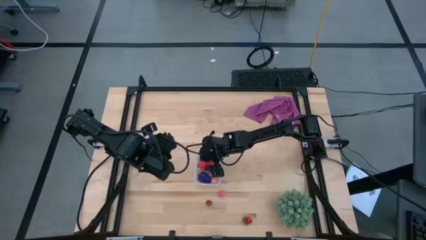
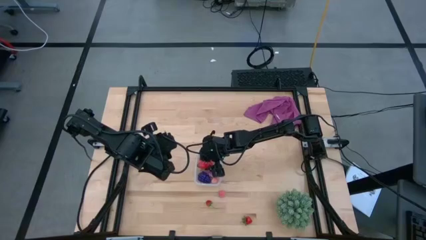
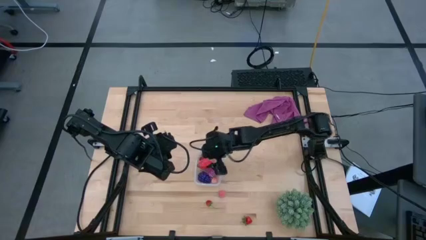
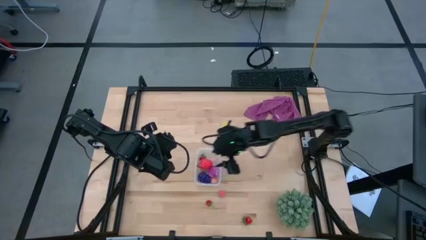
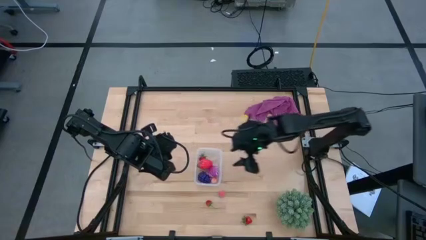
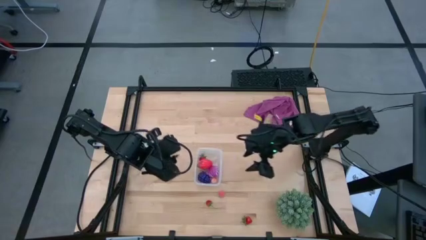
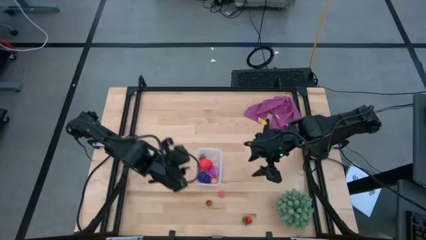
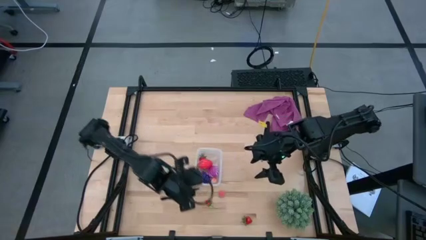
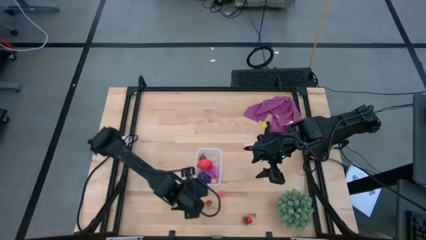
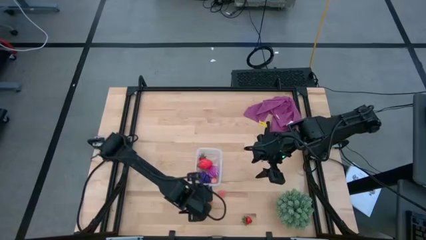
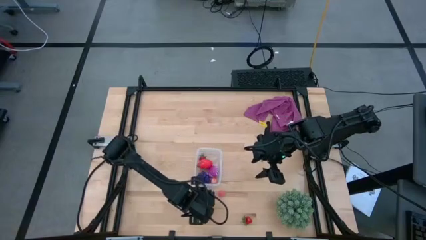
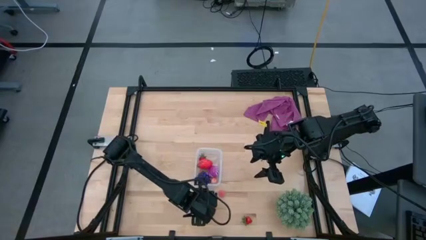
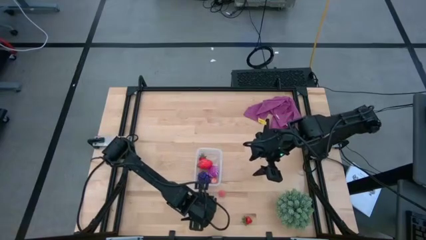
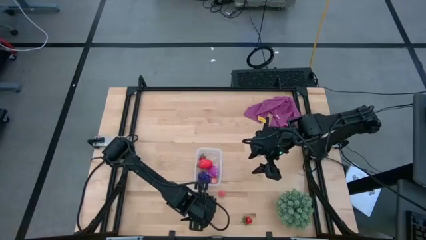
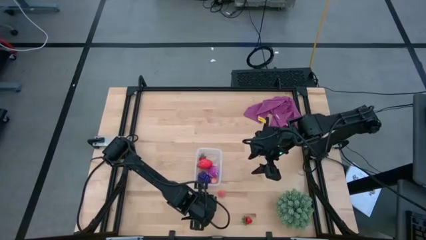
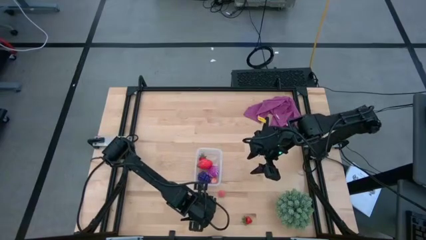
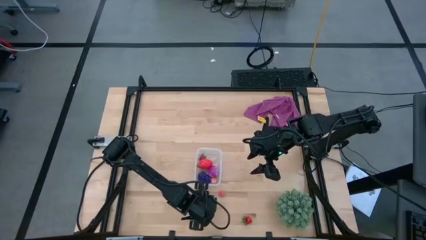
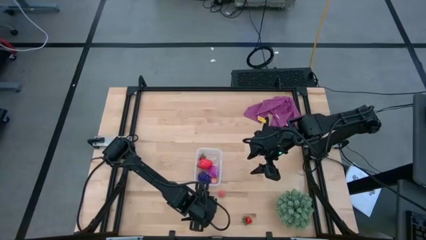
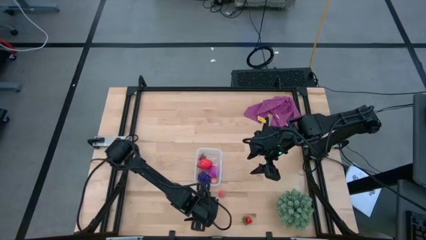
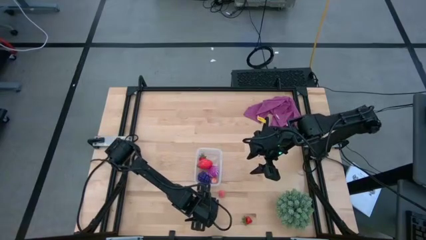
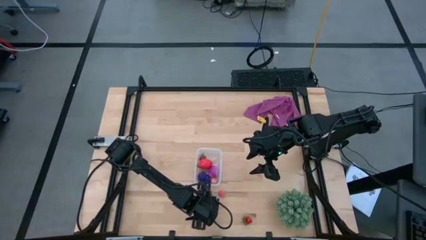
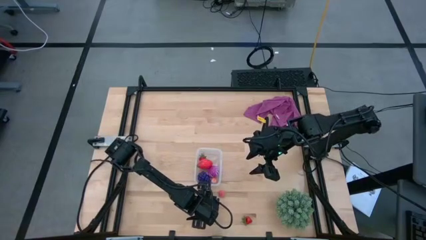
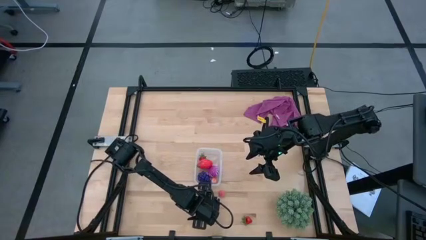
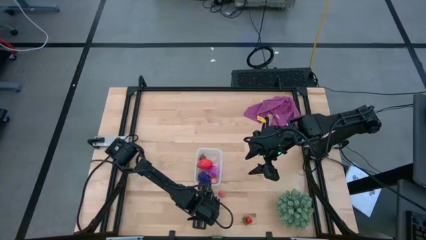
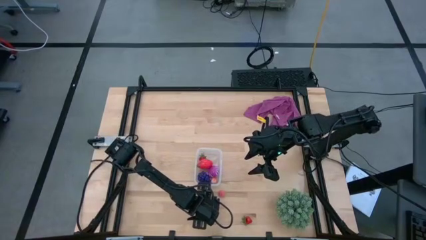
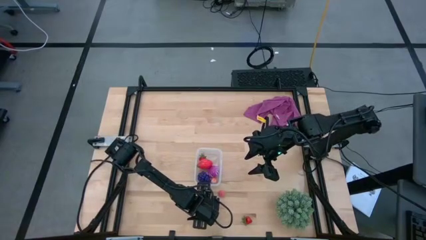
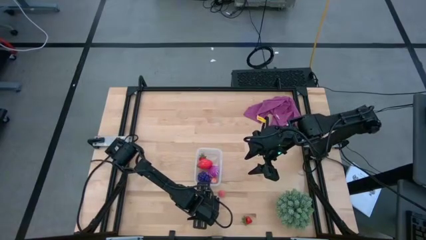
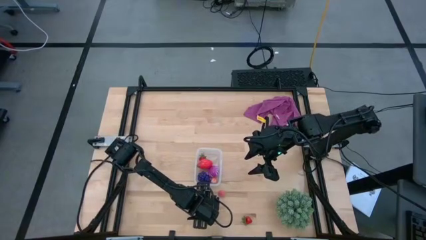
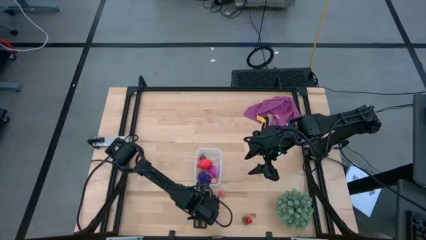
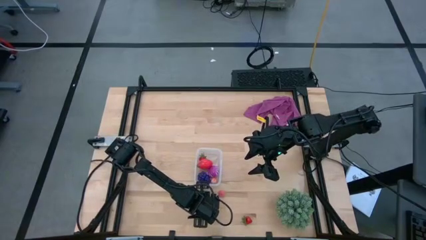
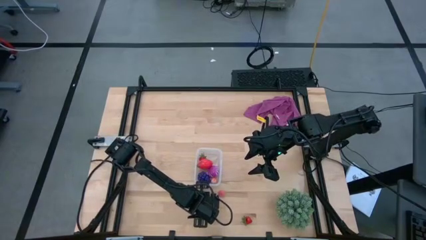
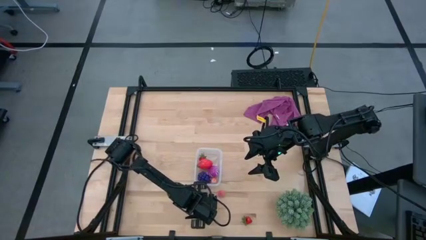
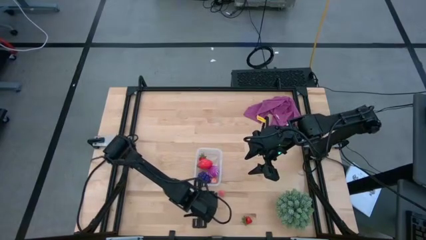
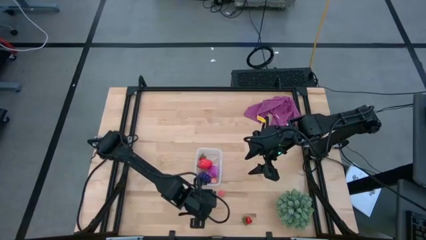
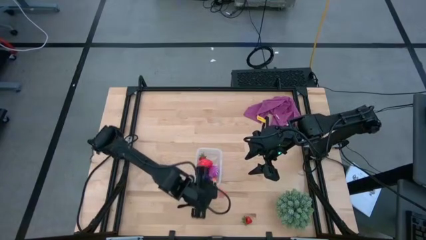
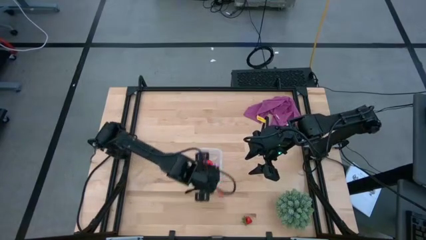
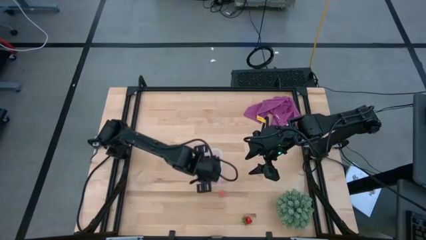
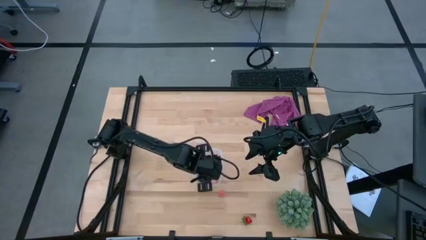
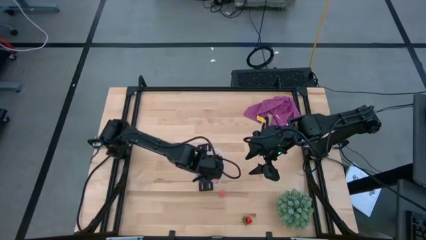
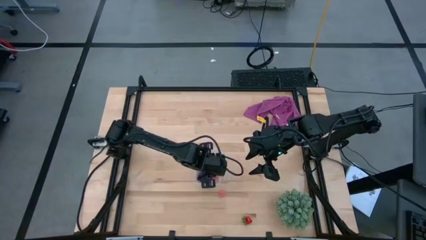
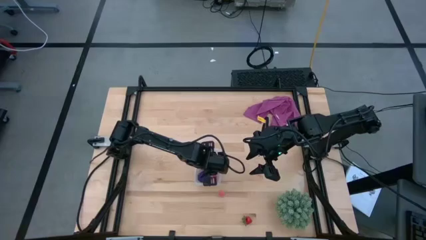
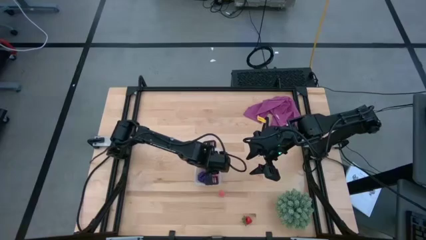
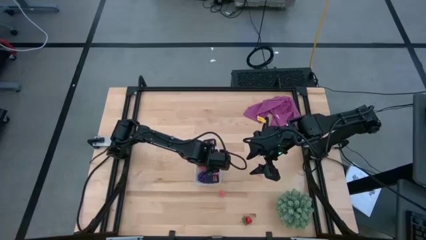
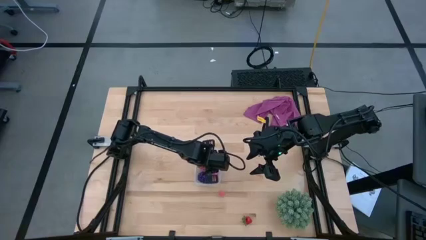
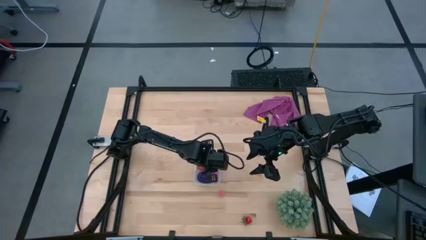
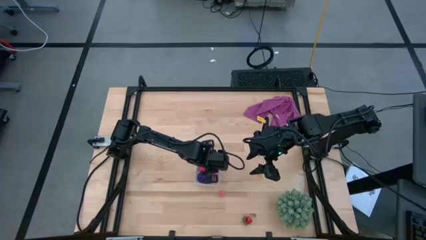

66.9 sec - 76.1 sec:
Task: Pick and placing Produce into tupperware
Put the red strawberry into the transparent bin
